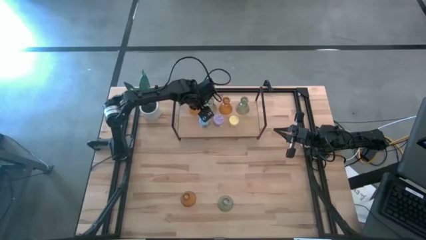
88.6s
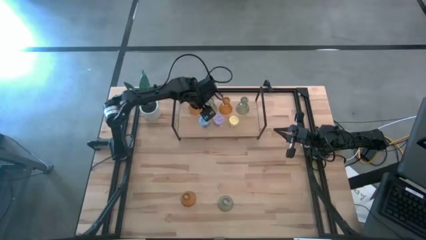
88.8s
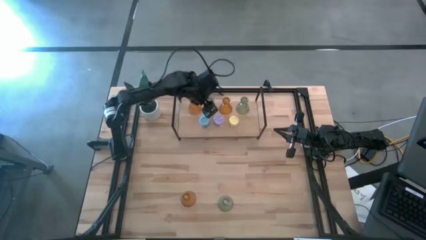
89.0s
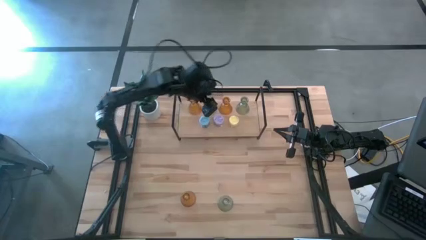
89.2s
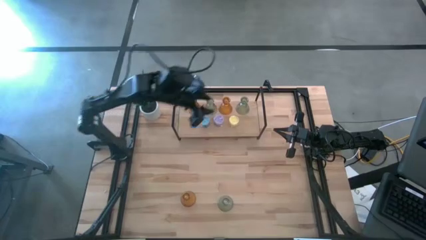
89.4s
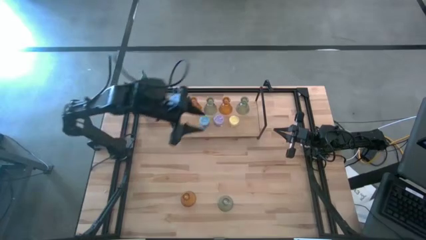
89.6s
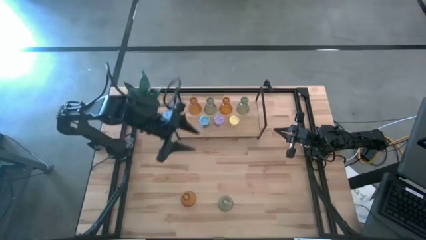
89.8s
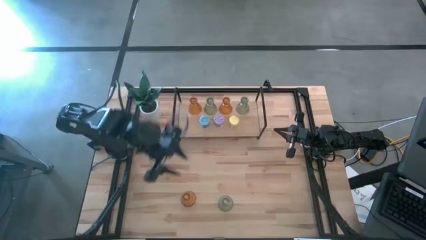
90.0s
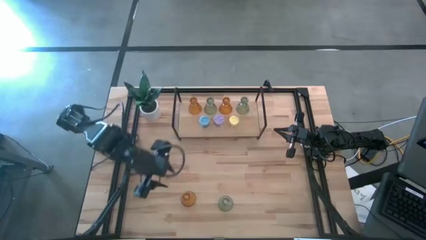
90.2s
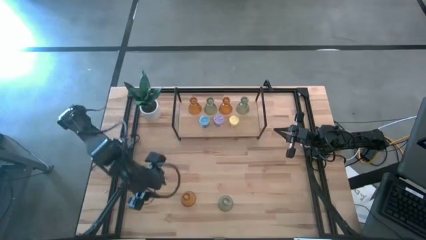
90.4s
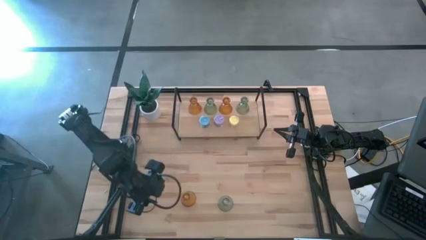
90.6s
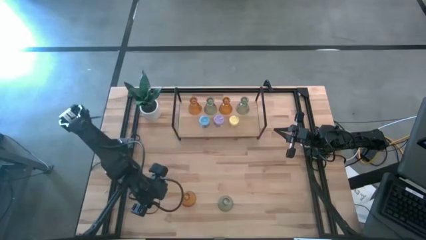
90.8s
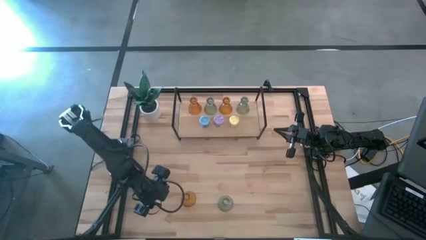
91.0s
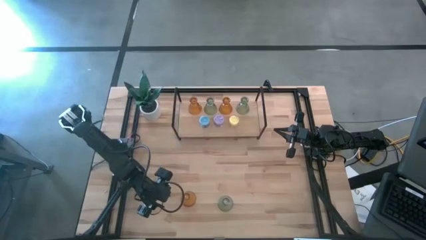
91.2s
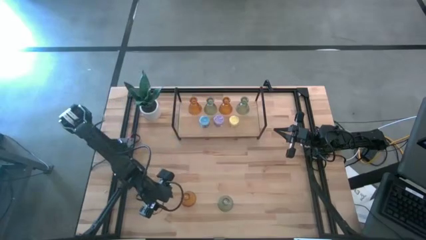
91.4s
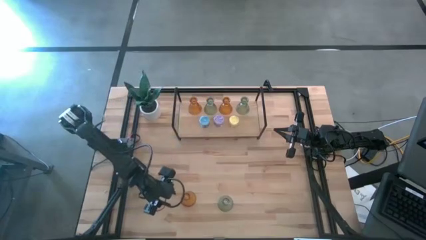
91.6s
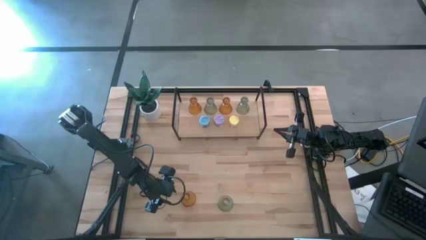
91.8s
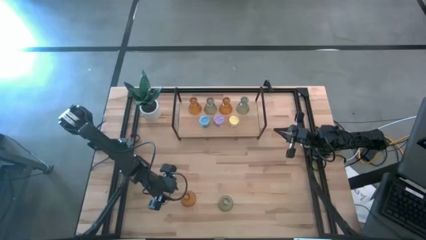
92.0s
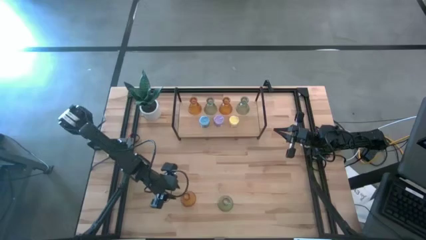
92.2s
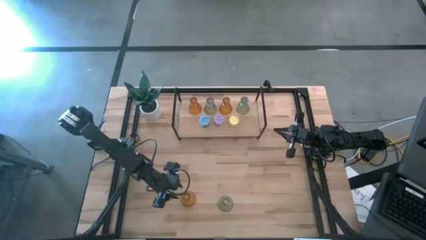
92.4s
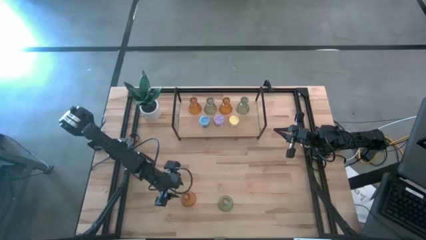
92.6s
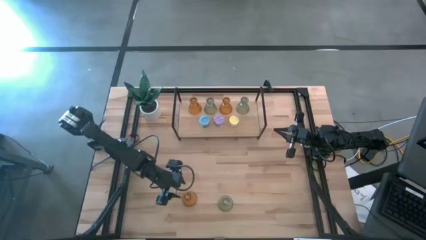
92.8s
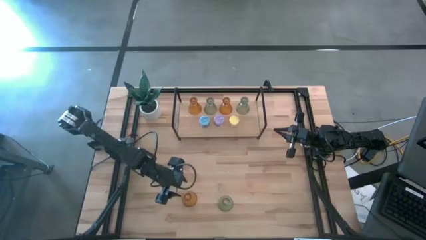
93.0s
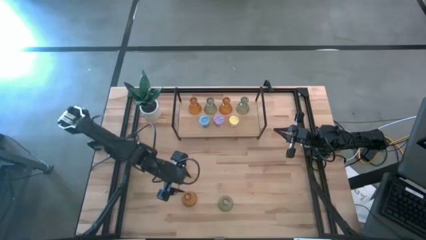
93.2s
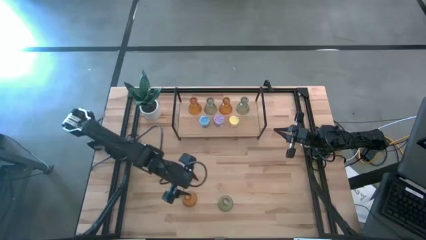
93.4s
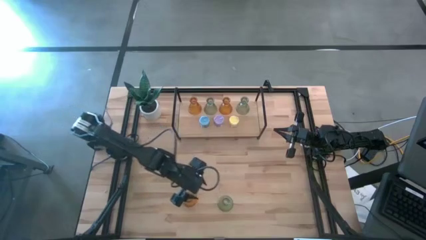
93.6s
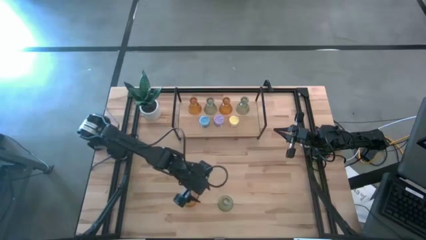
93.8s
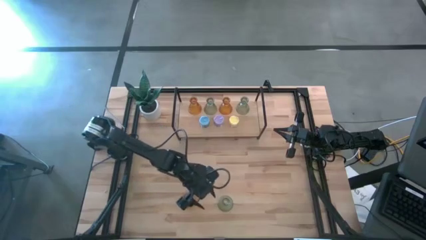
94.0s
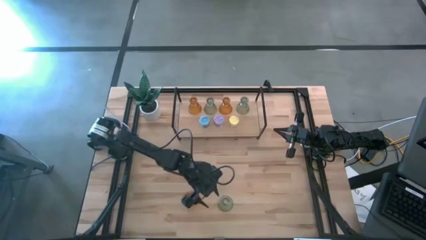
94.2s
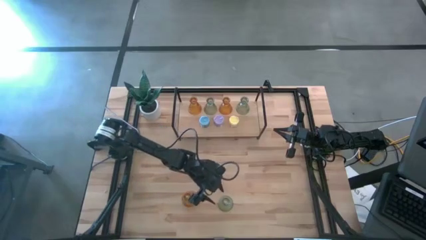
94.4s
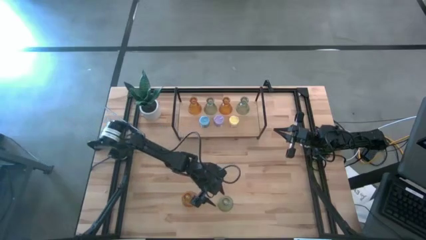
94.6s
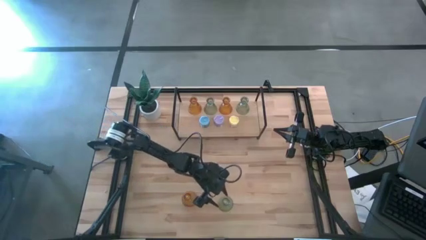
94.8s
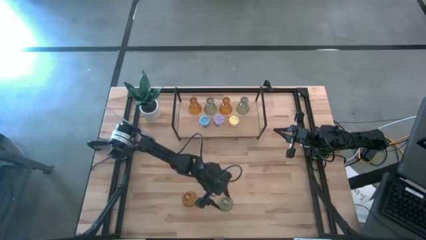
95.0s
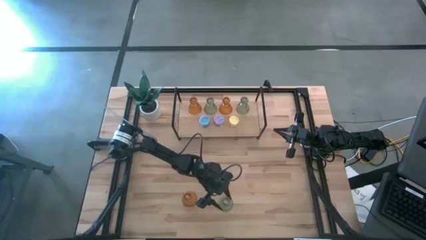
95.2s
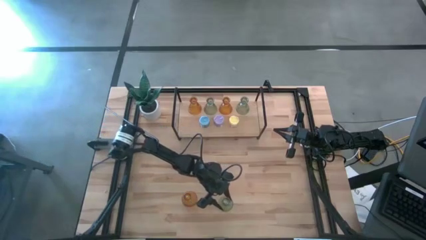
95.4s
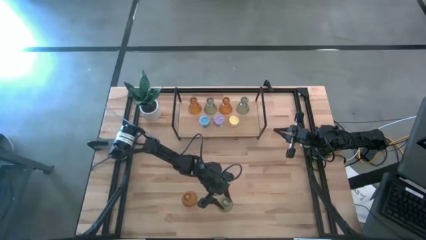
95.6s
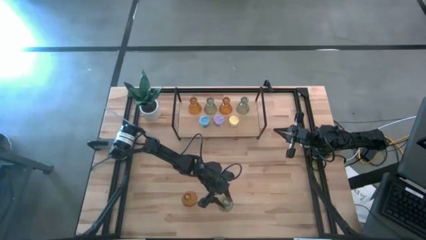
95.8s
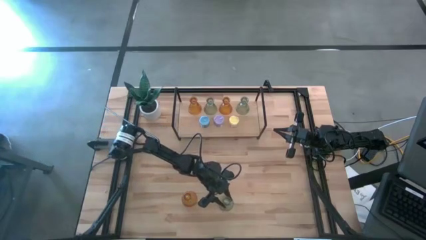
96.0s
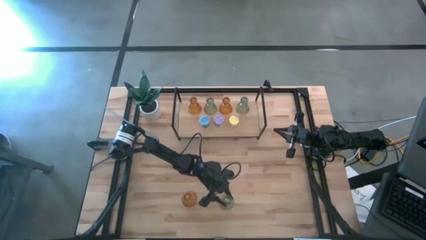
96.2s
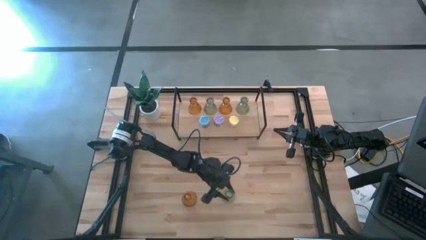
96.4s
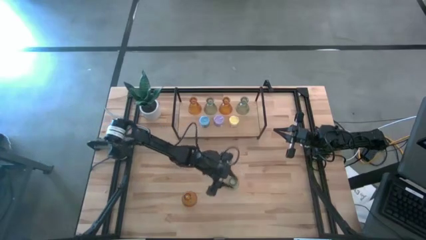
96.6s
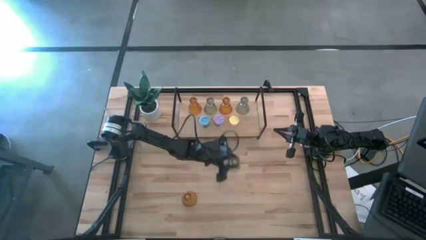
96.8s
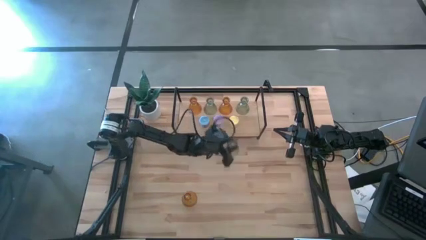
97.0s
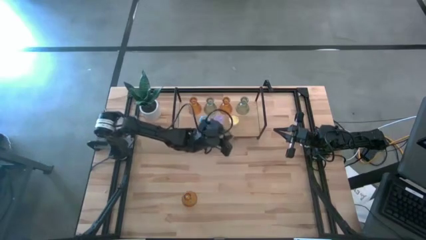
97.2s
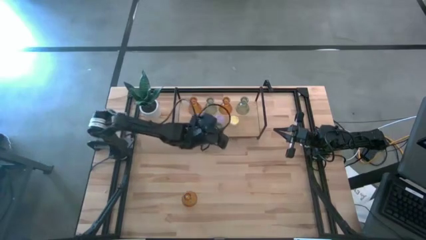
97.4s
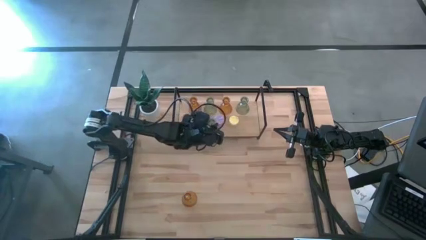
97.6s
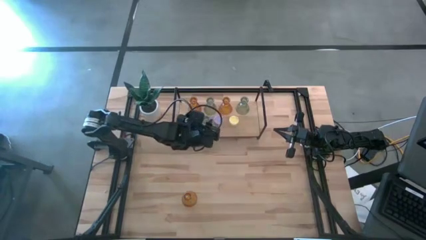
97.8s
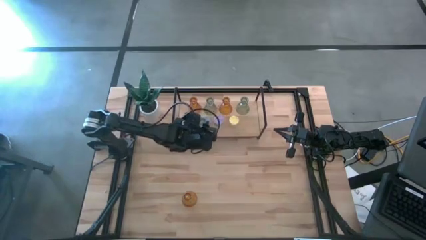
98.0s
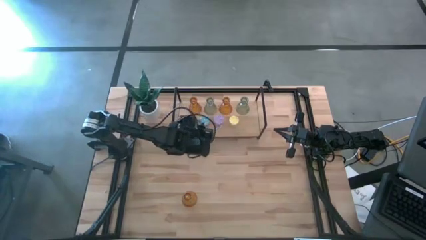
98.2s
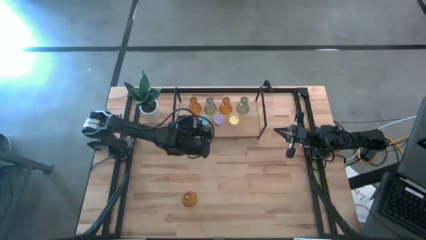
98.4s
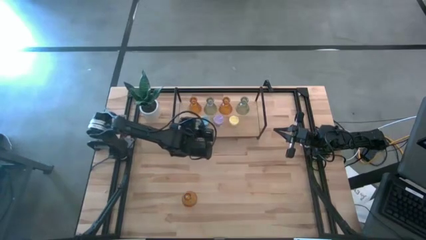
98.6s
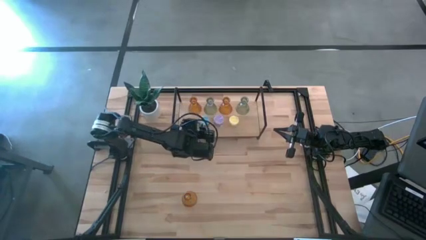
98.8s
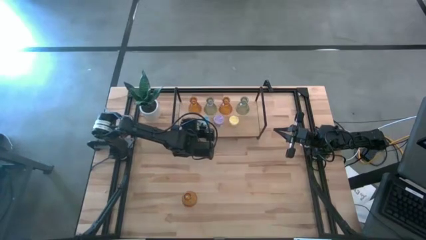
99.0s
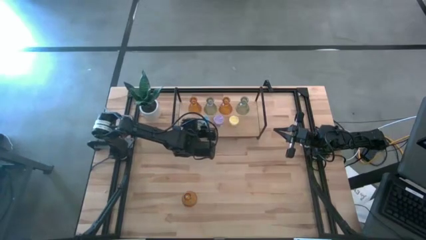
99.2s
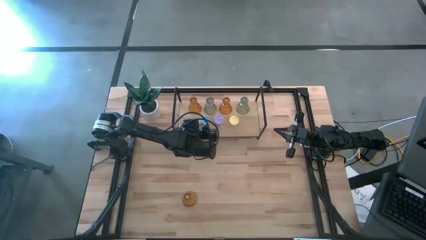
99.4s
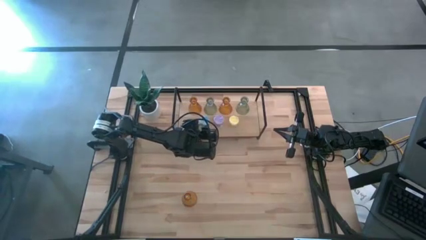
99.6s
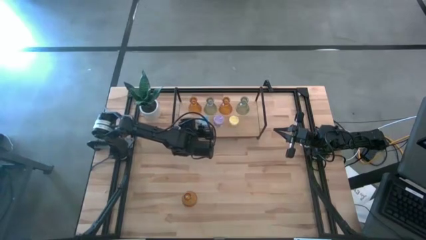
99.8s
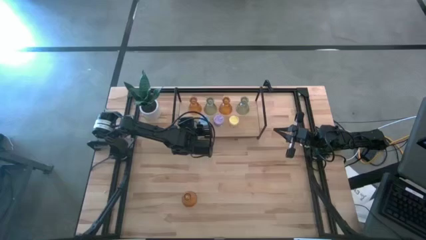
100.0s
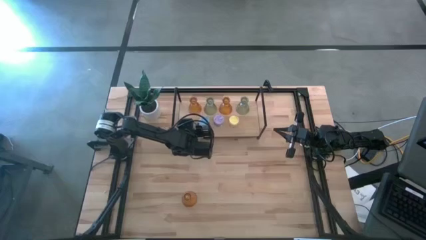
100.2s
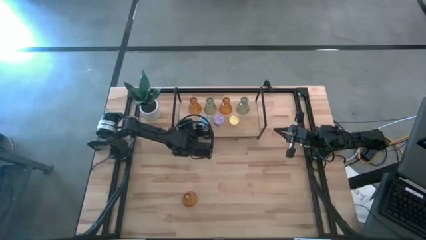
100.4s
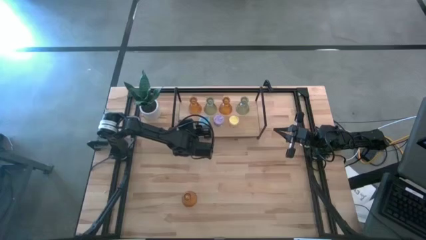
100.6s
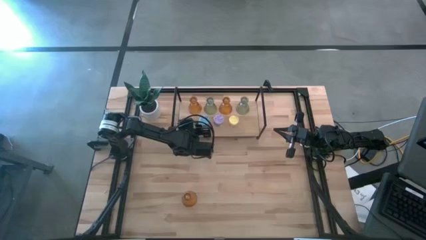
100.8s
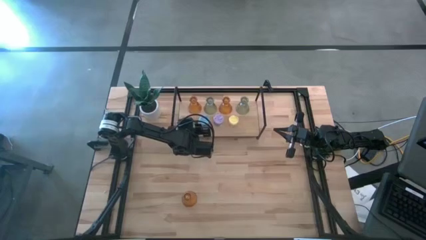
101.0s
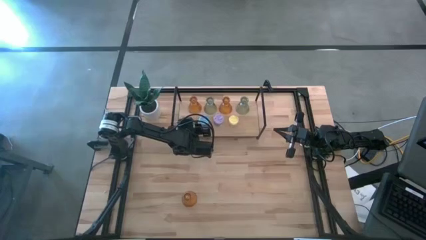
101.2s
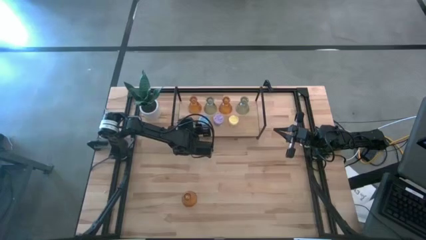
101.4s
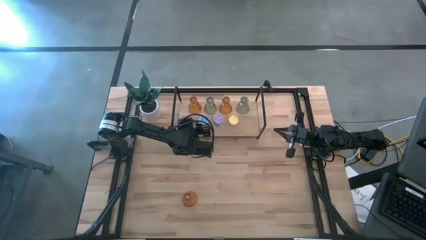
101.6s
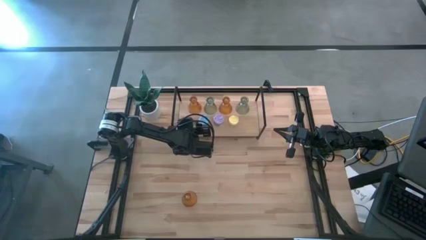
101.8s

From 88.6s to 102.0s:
Task: Pick & Place candle stick holders
Put the green glass candlestick on the shelf
